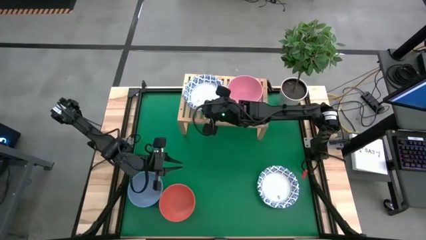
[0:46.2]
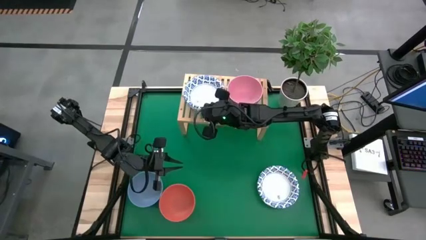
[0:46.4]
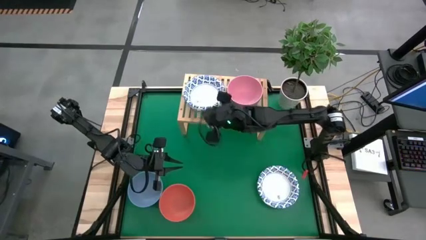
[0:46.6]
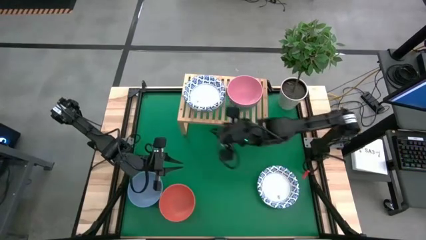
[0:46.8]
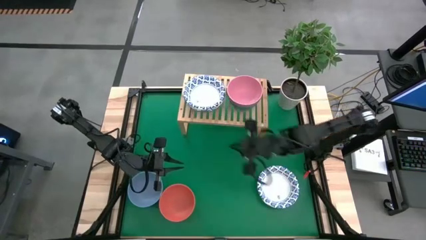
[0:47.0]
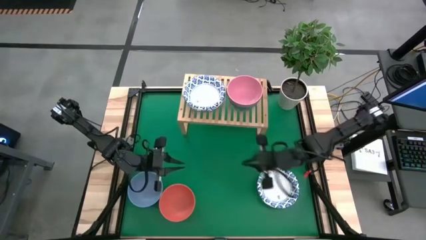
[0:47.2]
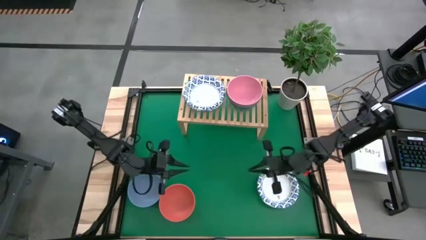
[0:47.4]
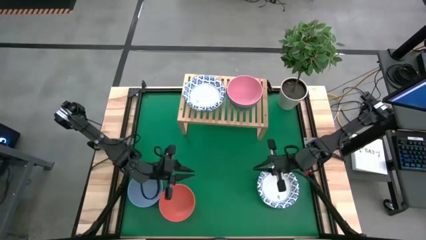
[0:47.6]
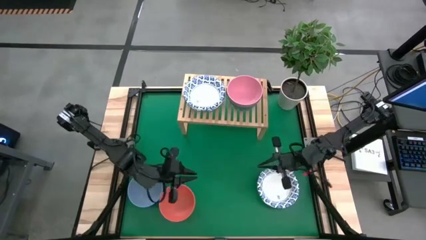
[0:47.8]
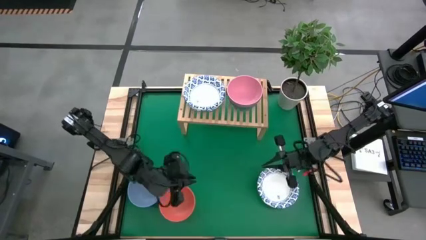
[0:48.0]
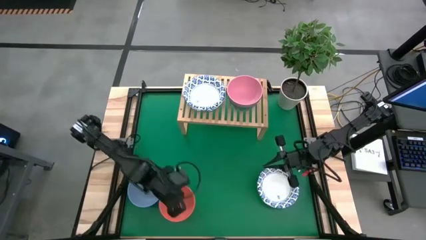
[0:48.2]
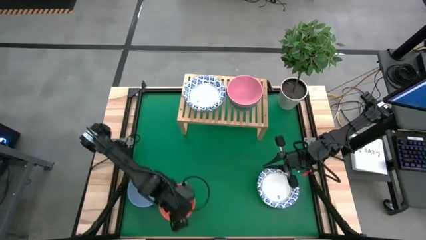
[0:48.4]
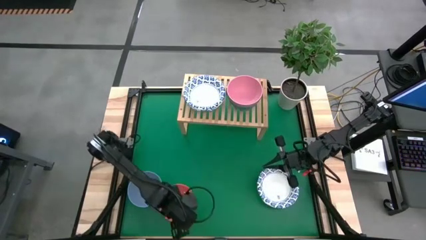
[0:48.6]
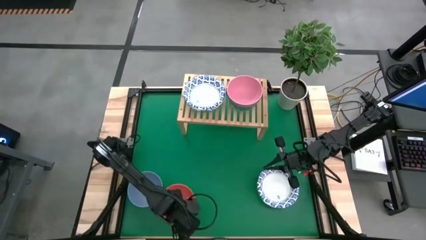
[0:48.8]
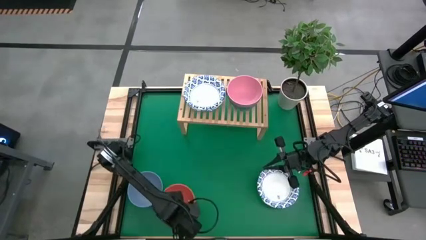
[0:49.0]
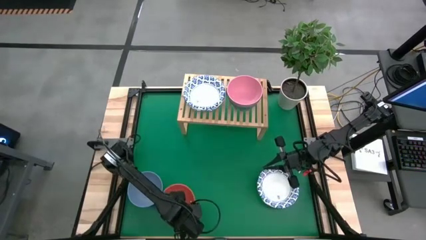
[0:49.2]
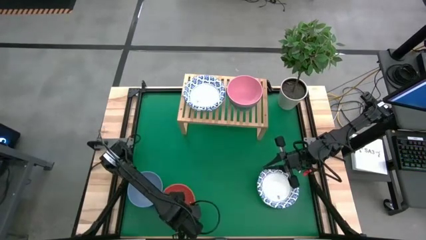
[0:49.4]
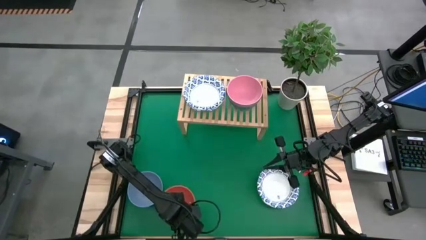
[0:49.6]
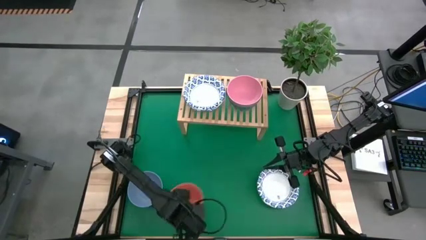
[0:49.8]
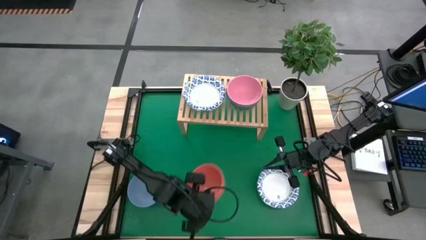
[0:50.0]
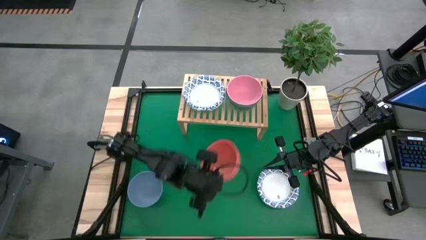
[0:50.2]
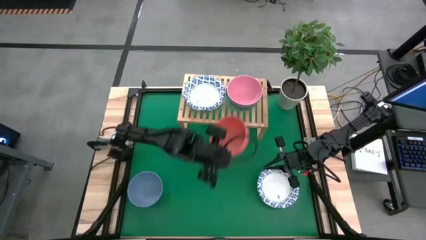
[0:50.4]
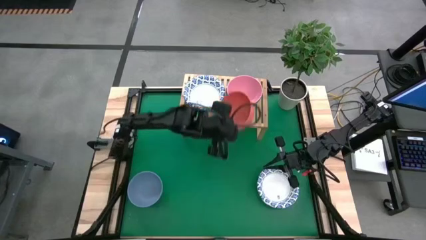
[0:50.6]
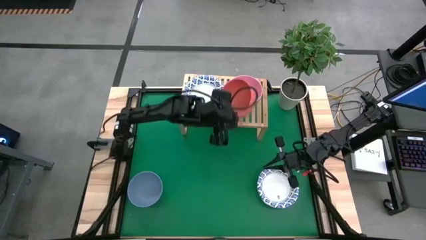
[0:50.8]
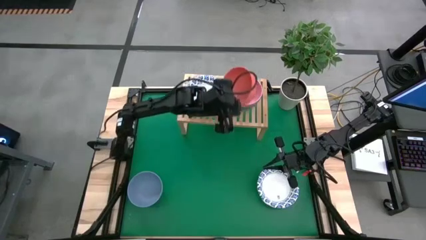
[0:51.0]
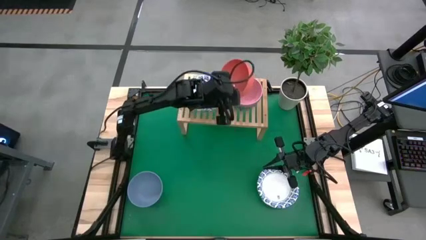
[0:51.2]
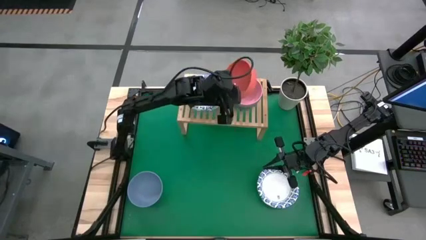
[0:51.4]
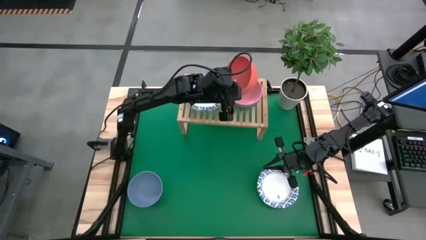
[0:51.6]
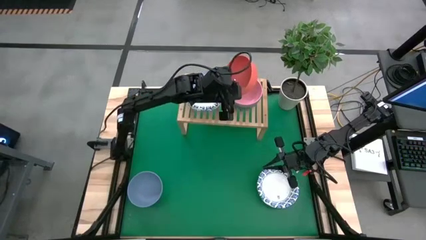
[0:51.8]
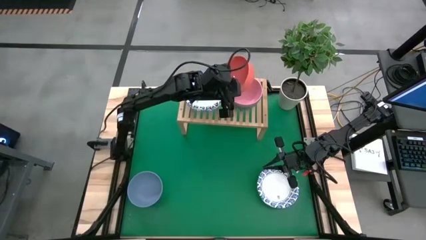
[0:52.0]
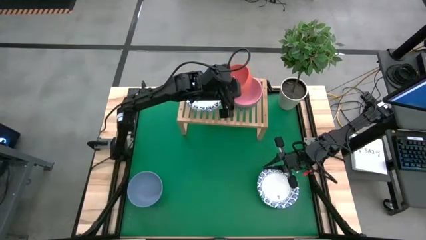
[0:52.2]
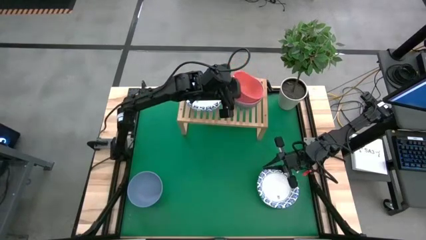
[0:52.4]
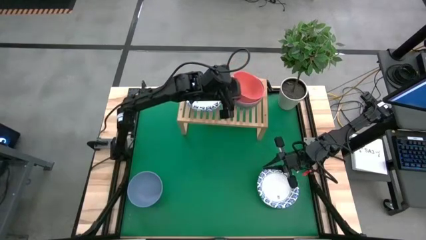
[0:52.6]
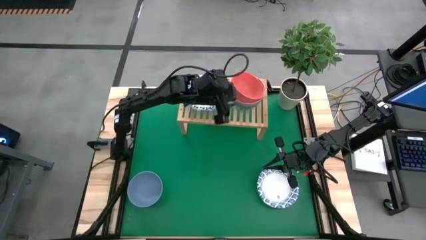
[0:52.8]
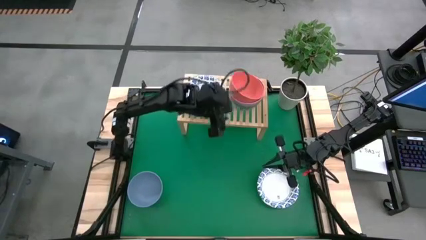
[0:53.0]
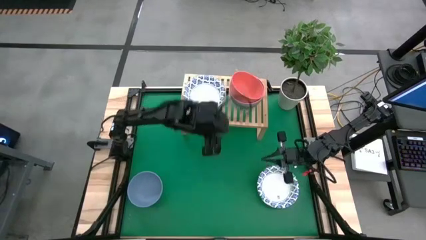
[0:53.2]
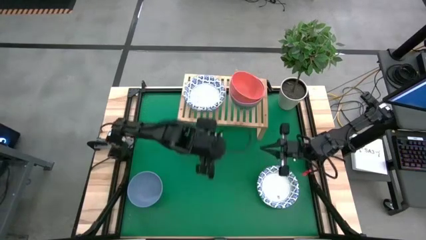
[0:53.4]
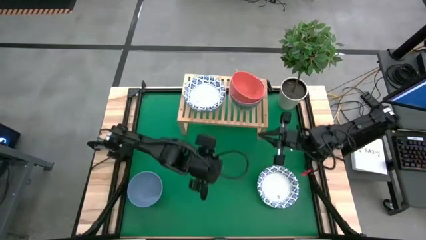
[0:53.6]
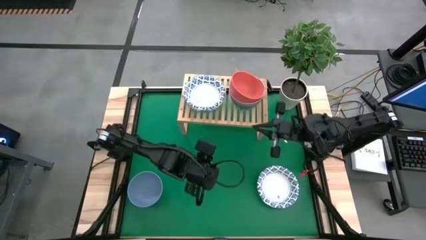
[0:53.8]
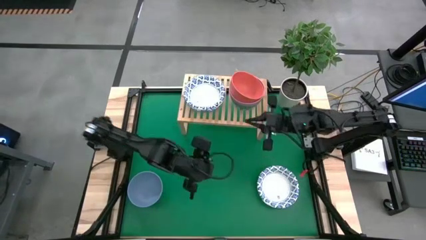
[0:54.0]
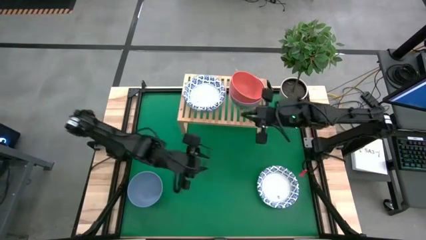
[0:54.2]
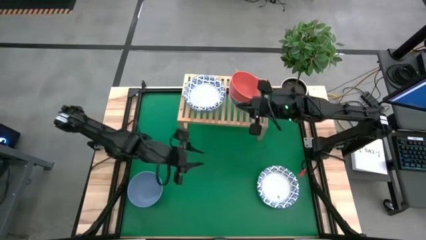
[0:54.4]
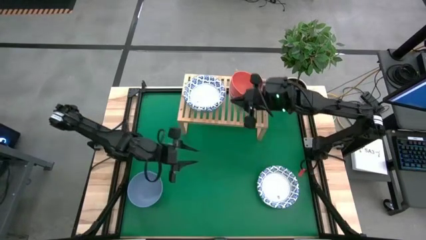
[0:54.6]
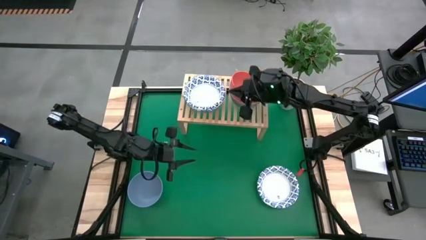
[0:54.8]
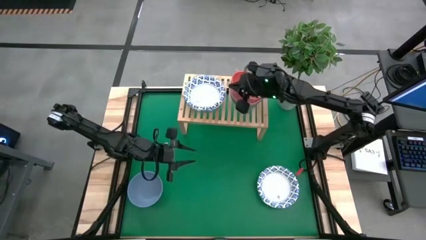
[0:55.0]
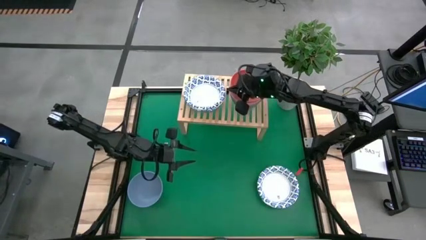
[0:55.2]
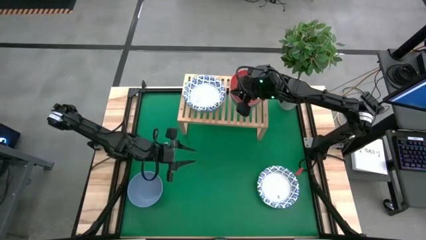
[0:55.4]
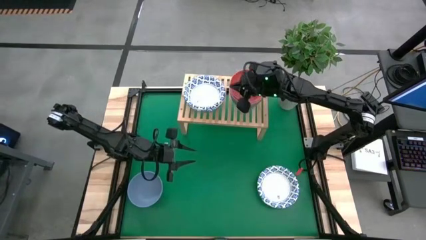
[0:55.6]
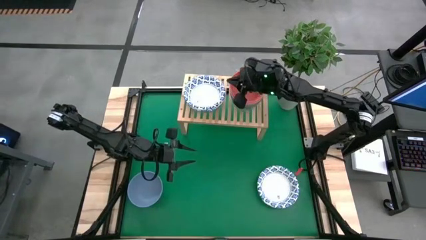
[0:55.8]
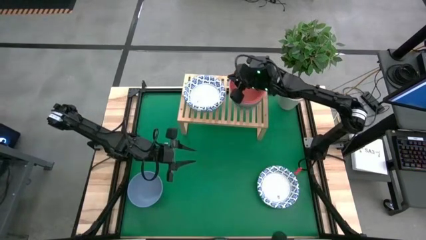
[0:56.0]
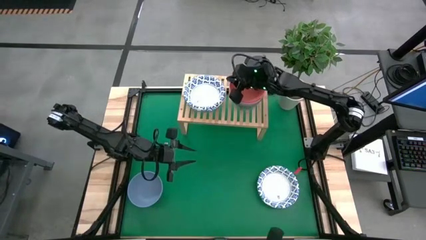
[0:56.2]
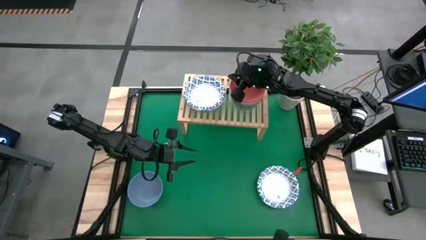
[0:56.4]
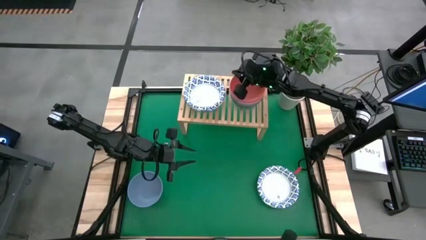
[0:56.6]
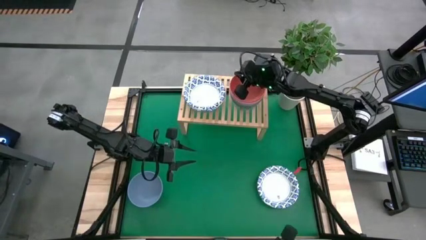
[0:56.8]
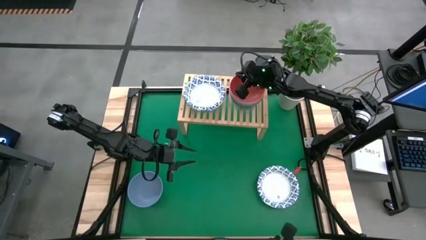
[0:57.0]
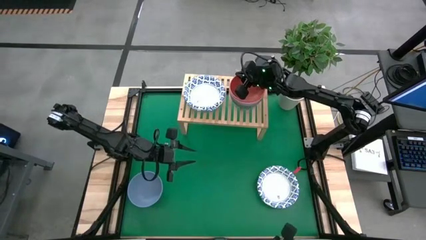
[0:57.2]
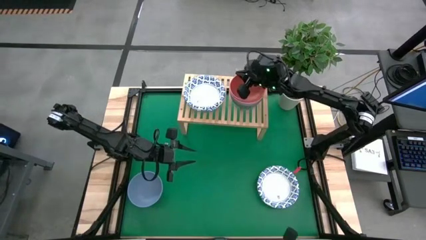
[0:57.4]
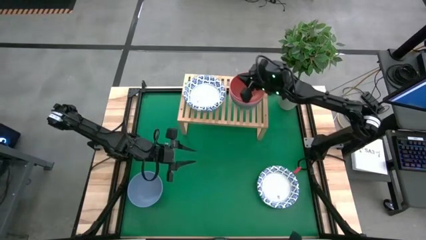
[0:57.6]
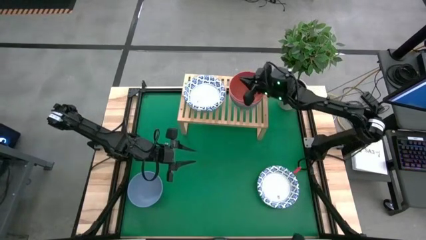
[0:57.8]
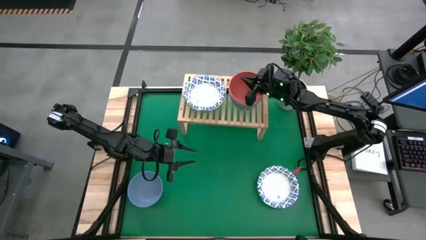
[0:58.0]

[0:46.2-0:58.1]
Task: Place and stack bowls onto a shelf
Stack the orange bowl on top of the pink bowl on the shelf

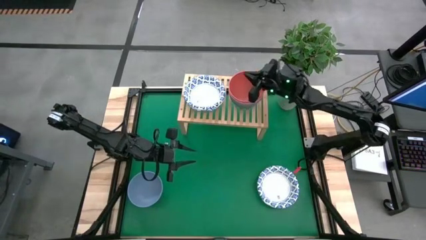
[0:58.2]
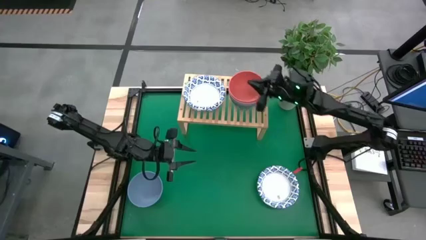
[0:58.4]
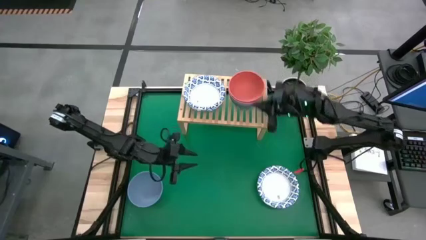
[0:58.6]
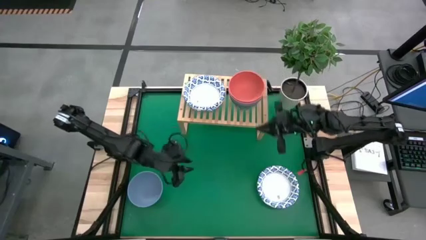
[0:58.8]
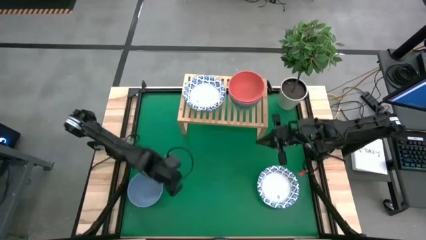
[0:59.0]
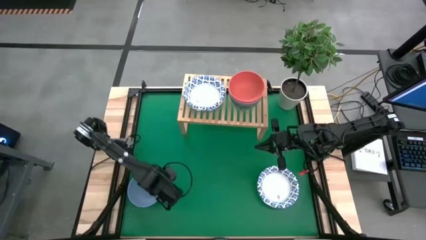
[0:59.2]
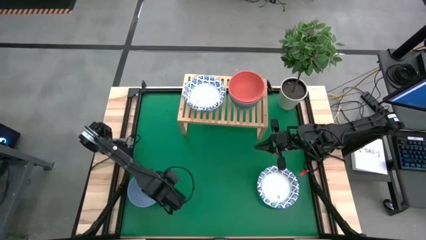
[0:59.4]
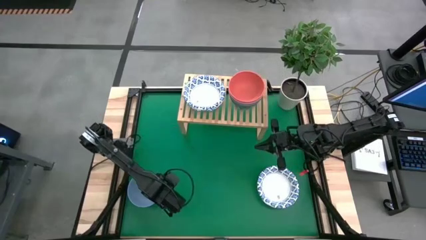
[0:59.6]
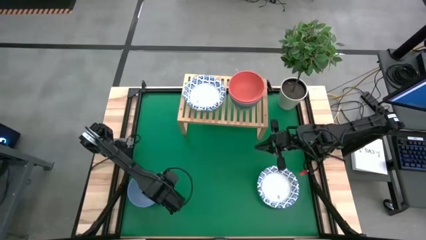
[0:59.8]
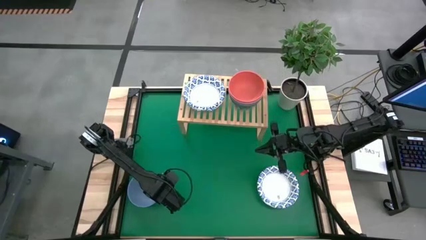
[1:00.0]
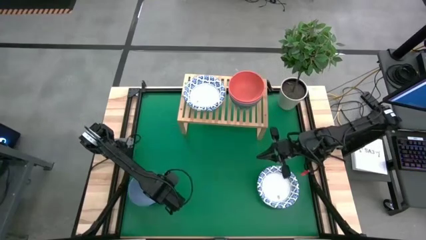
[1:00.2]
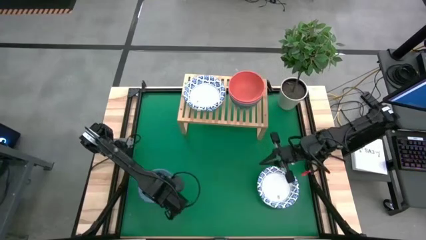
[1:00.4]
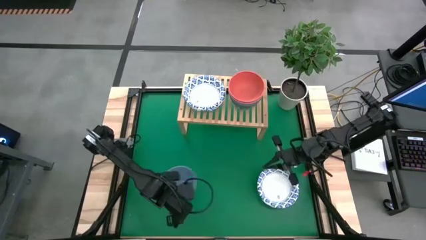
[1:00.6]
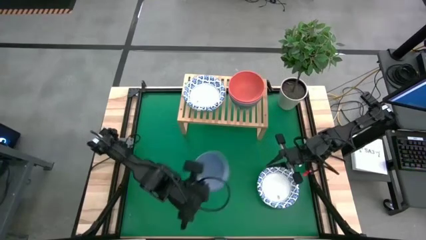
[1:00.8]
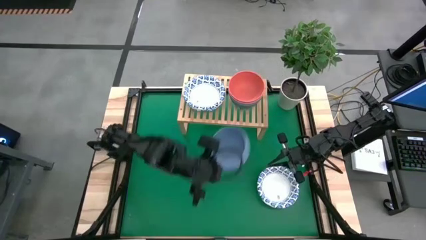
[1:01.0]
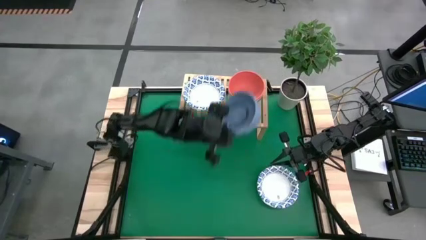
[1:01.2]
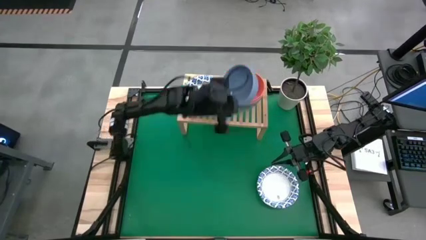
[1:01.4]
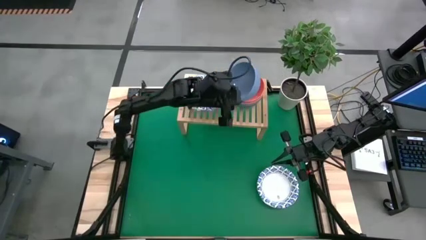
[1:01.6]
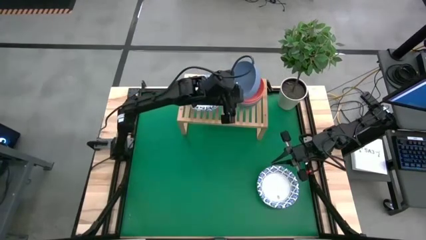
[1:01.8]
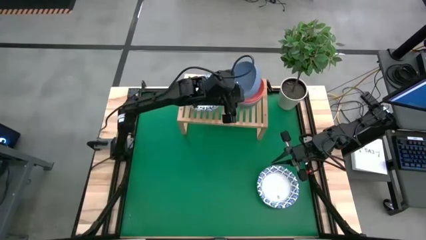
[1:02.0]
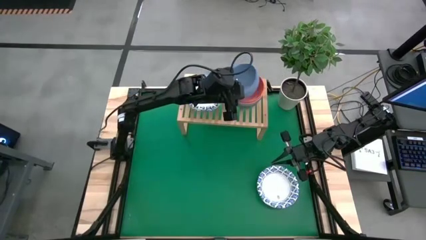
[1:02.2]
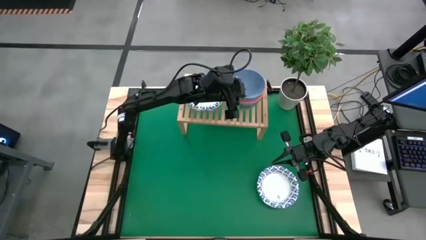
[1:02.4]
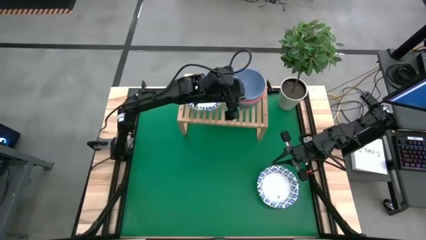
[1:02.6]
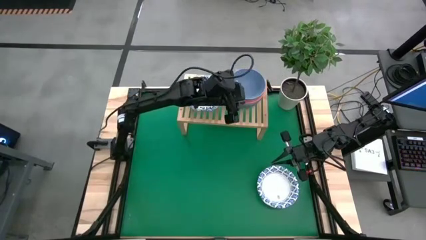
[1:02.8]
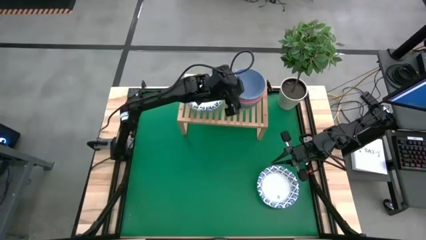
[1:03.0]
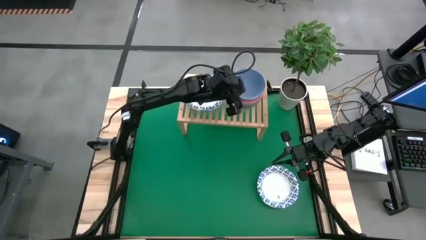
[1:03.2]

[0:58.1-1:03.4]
Stack the blue bowl on top of the orange bowl on the shelf
